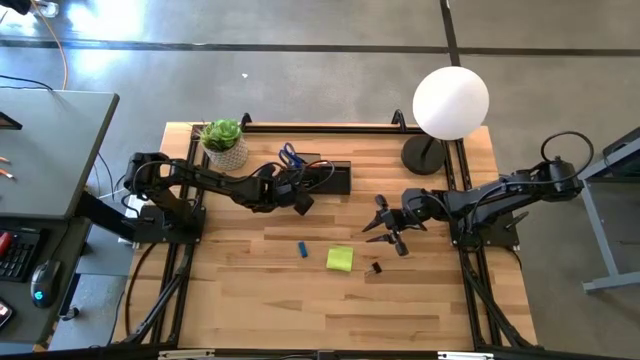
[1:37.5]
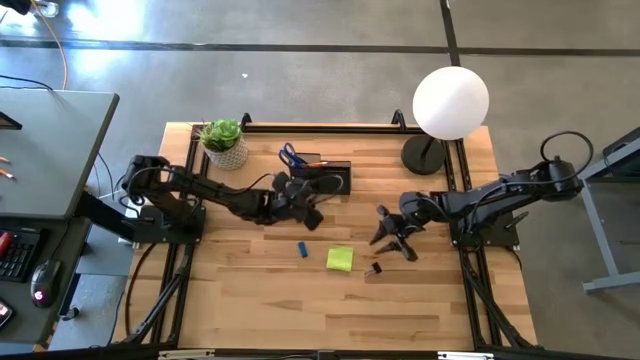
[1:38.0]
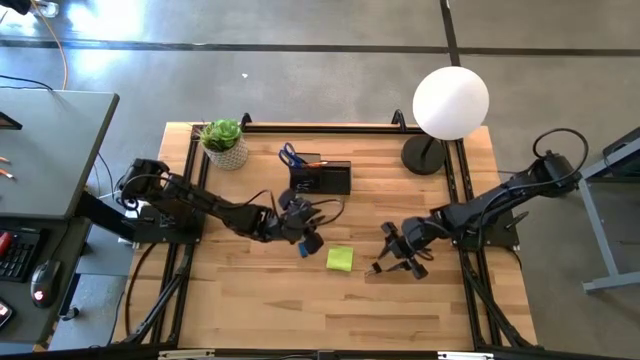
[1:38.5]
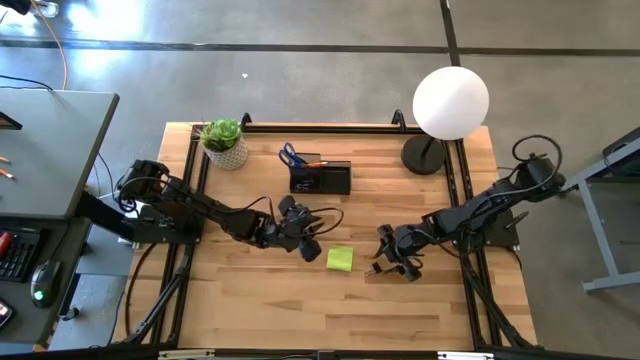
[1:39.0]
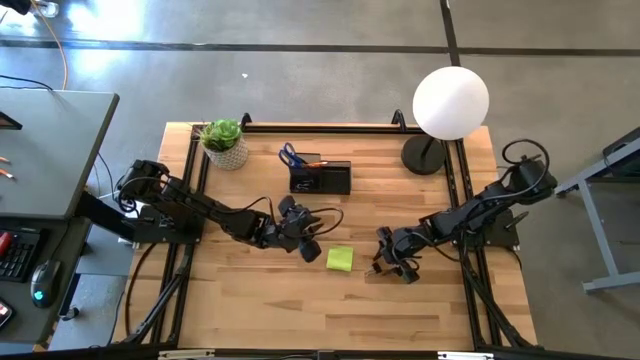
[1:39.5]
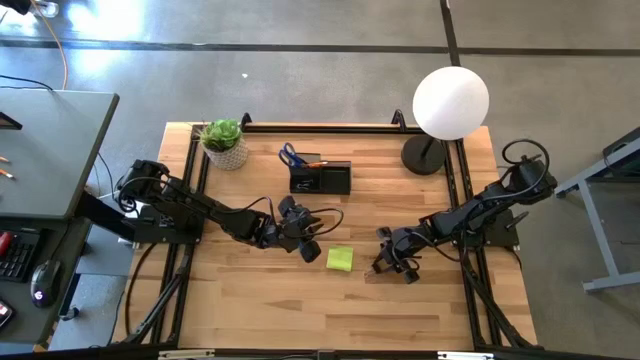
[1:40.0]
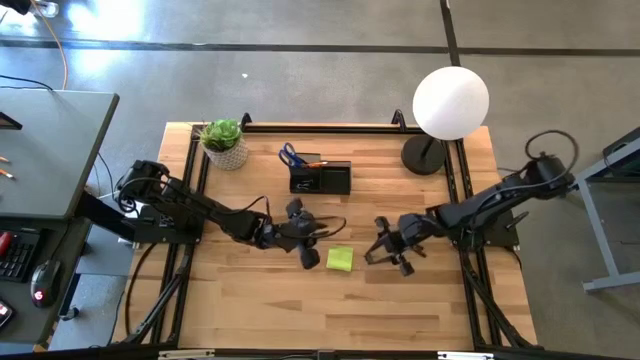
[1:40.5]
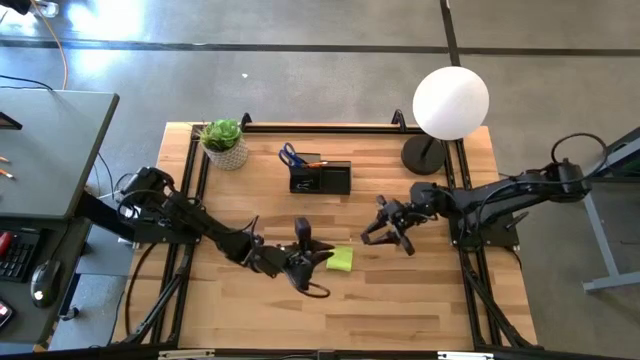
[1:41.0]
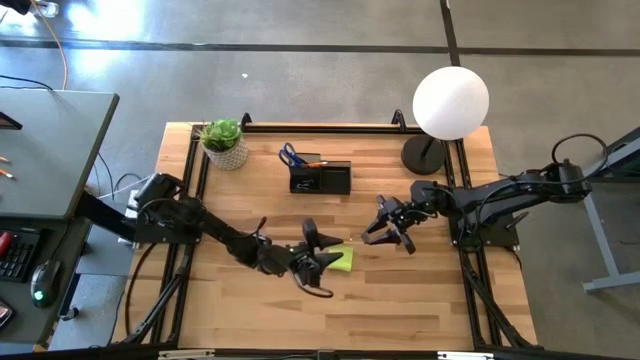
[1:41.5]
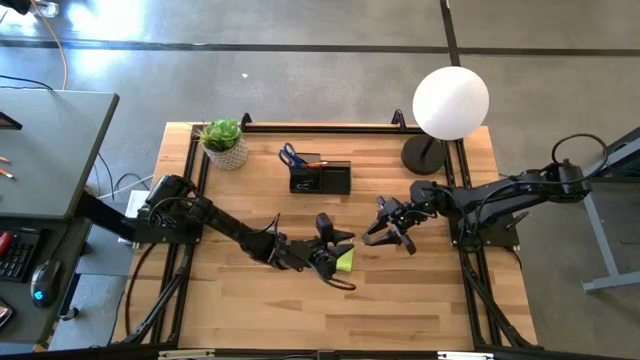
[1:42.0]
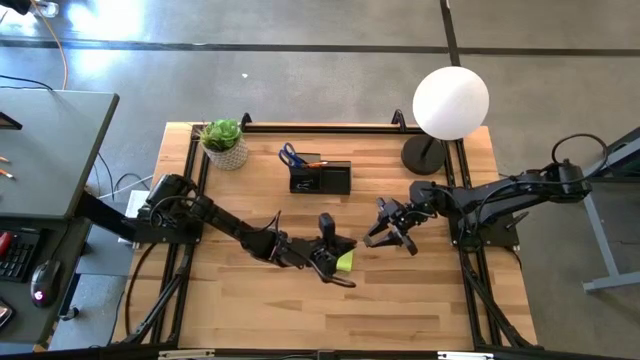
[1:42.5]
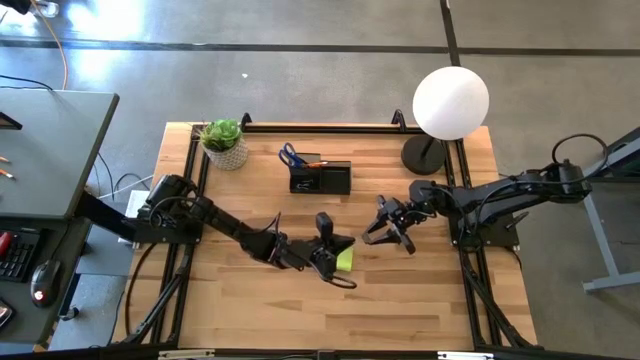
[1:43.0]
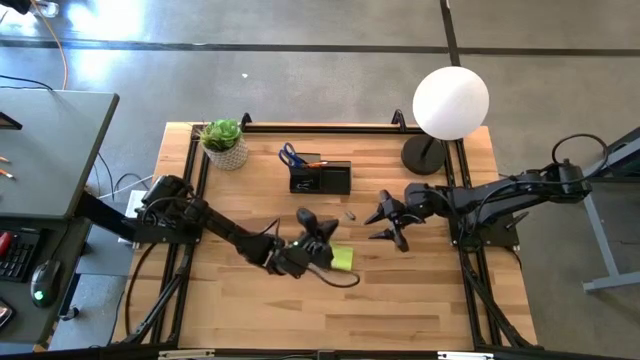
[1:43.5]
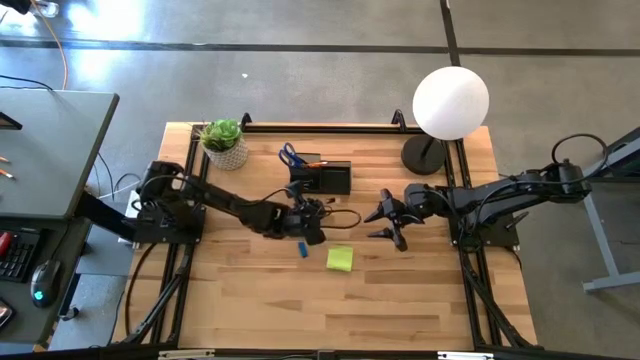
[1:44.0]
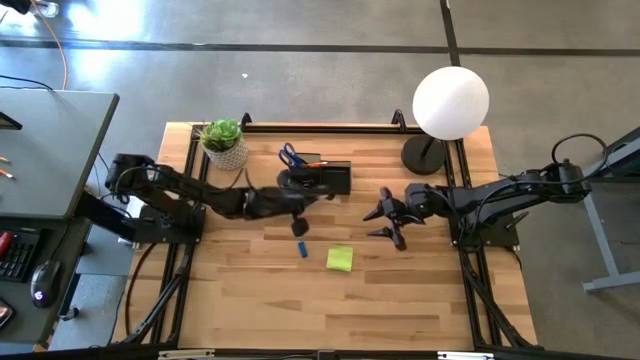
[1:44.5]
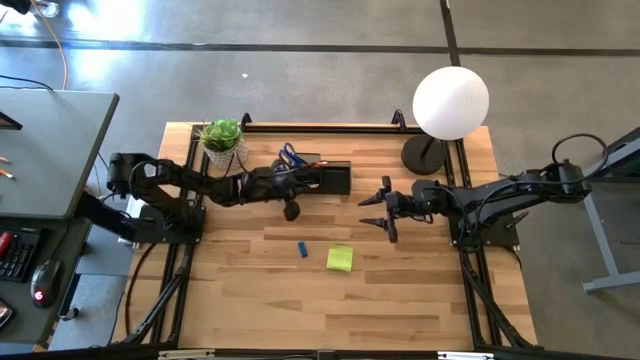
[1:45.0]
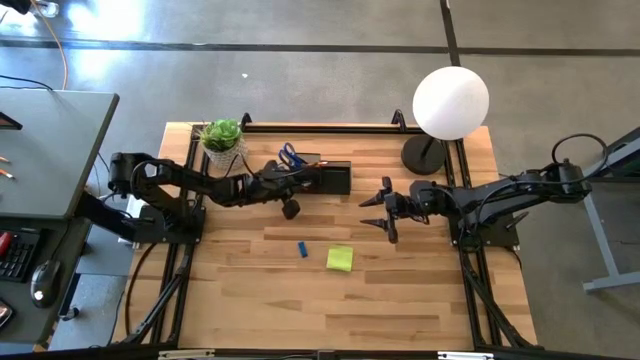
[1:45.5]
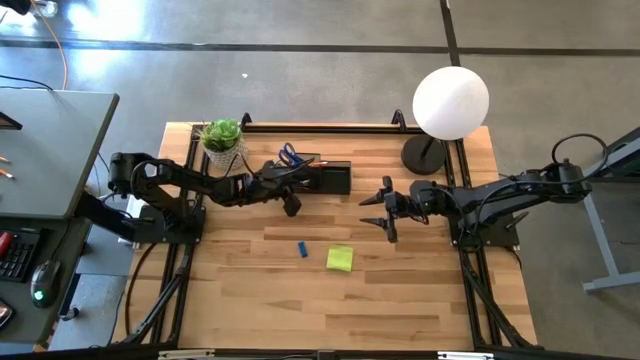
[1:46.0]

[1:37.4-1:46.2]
Task: Pick and place office supplies into organizer
Put the black binder clip into the black desk organizer

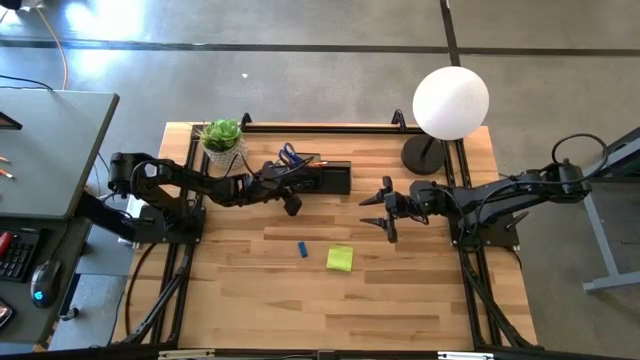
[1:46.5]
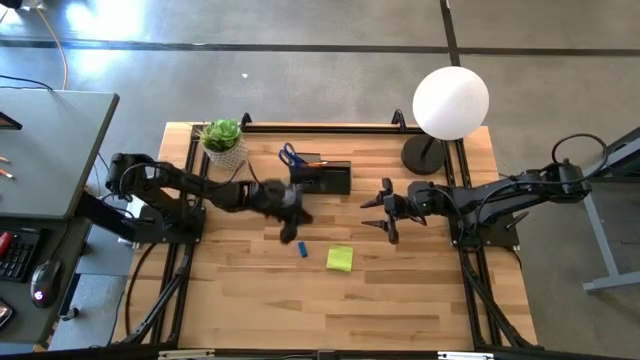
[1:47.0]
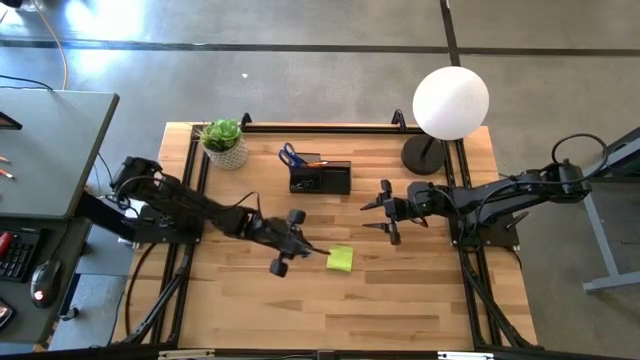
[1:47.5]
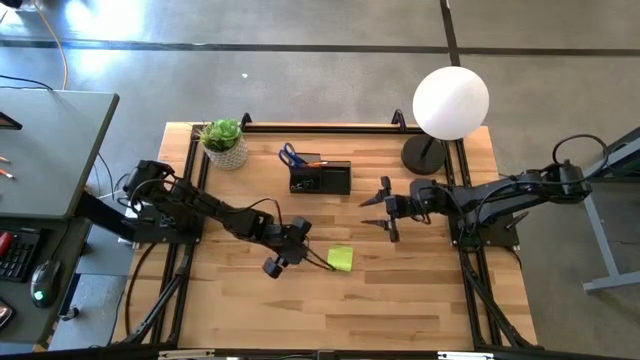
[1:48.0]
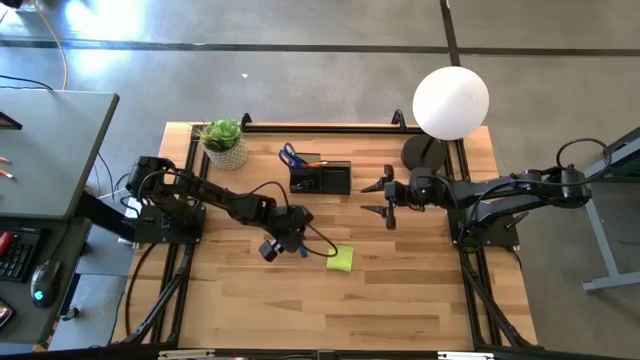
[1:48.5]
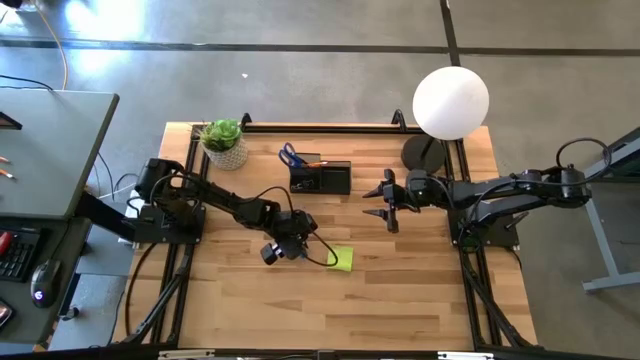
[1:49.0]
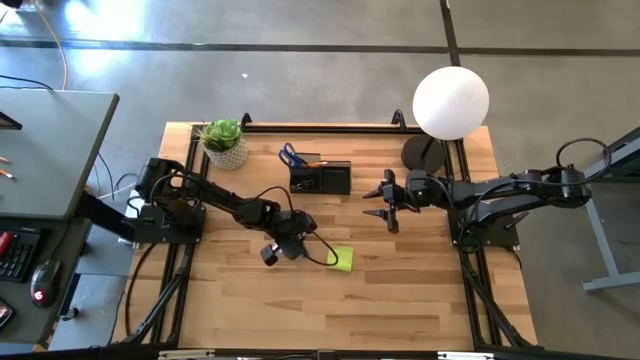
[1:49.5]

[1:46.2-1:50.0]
Put the blue eraser into the black desk organizer

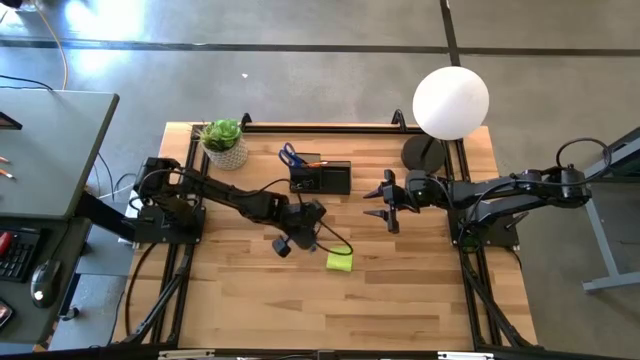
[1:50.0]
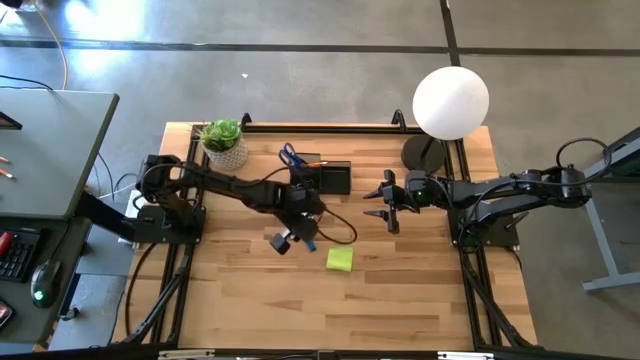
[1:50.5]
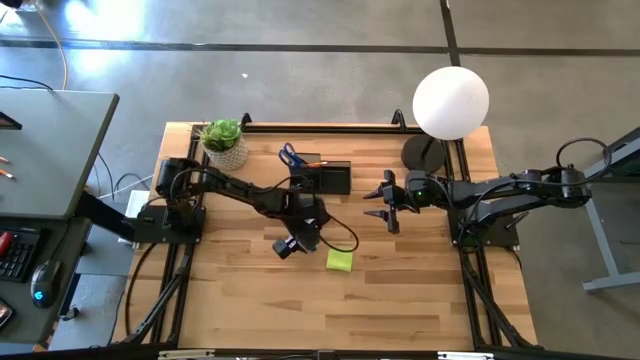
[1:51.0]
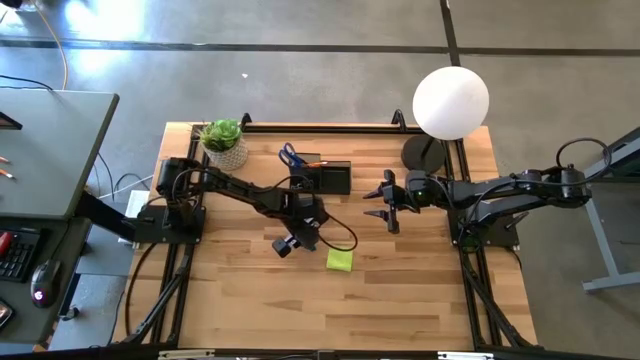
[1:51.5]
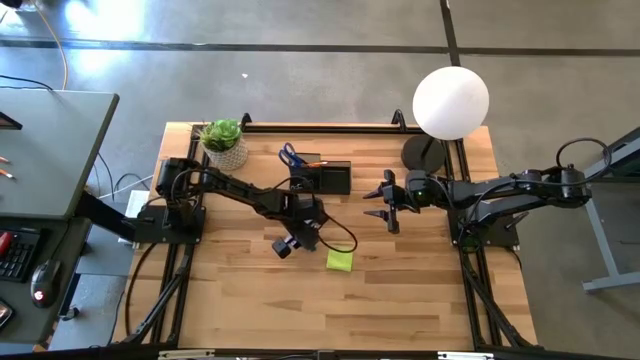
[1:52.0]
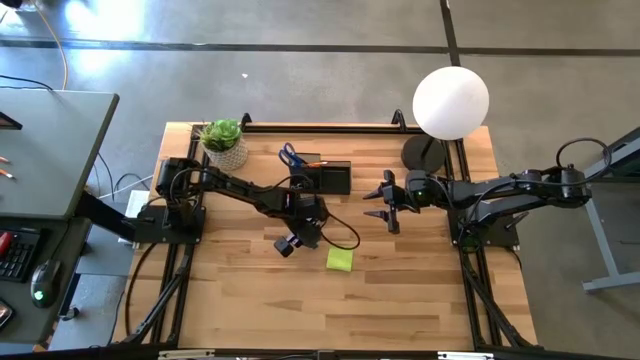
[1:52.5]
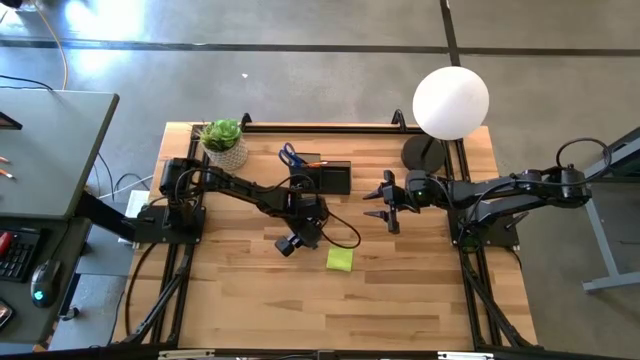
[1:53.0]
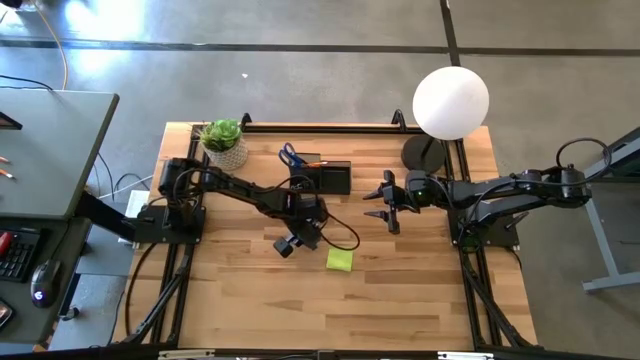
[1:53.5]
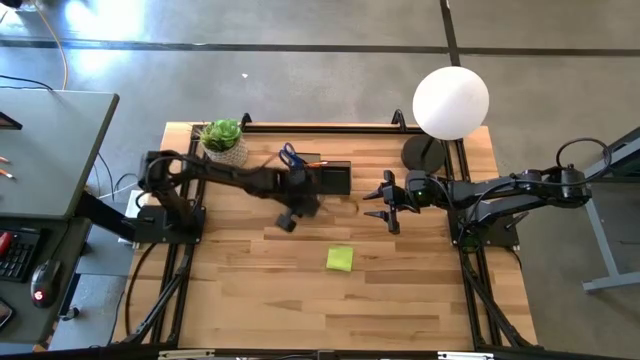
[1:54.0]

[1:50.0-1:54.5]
Put the blue eraser into the black desk organizer

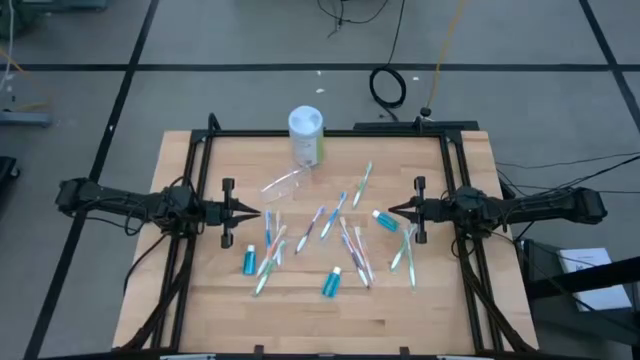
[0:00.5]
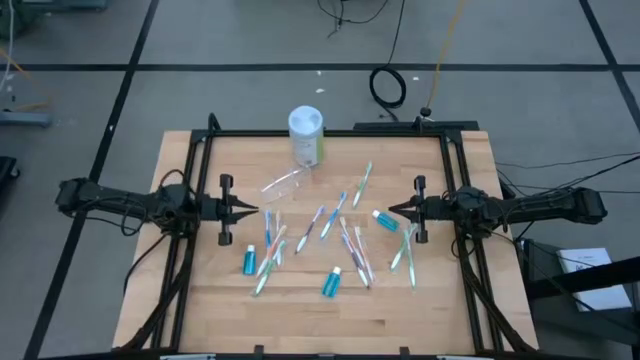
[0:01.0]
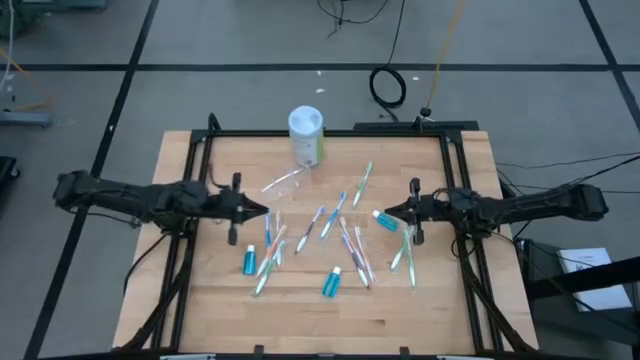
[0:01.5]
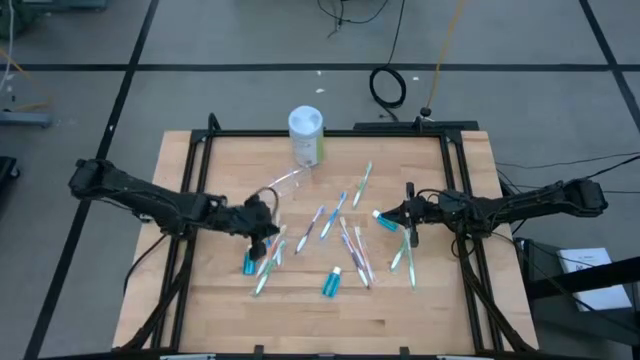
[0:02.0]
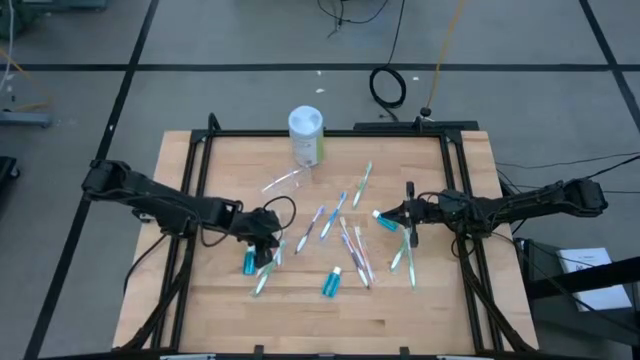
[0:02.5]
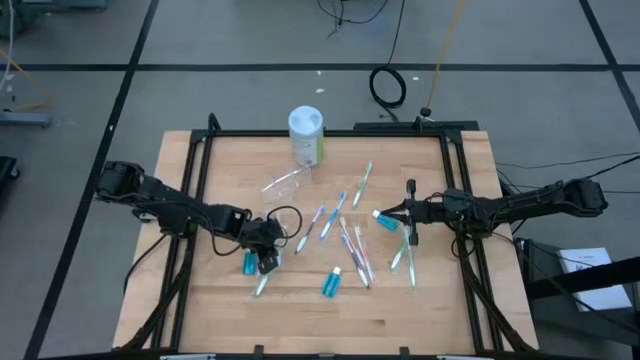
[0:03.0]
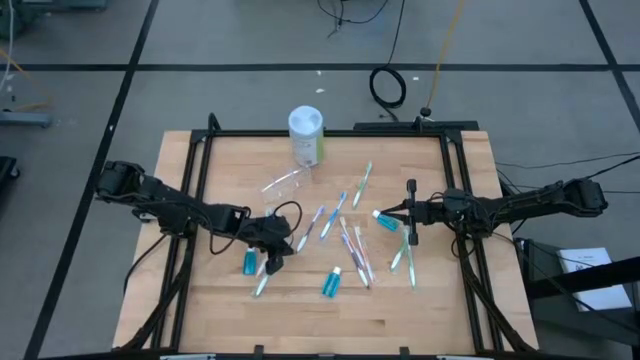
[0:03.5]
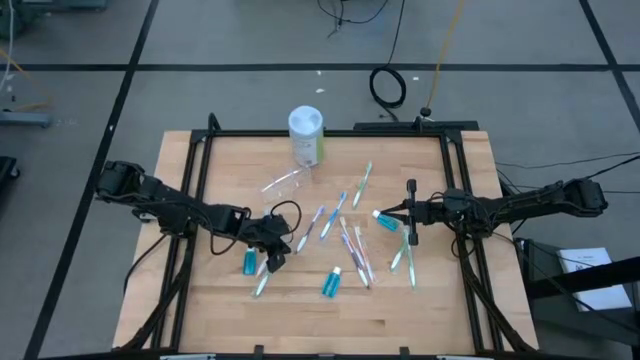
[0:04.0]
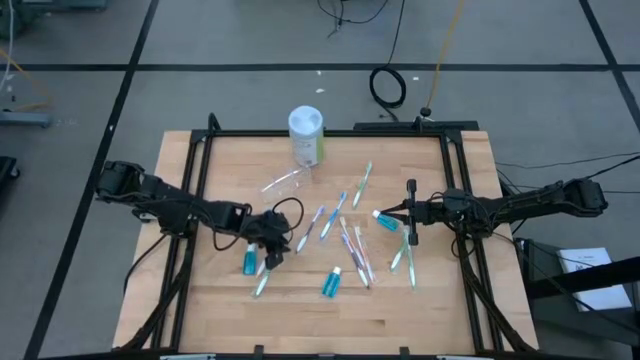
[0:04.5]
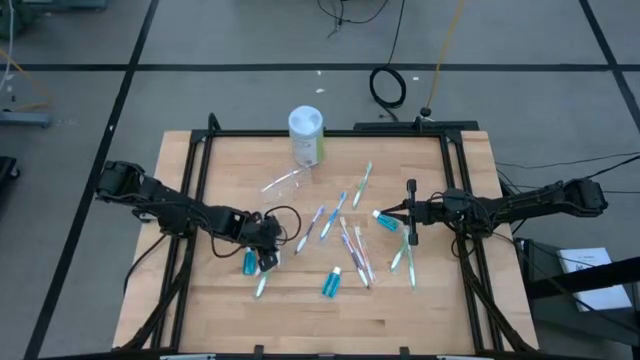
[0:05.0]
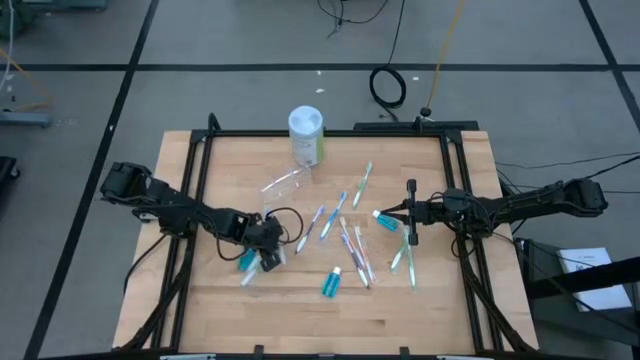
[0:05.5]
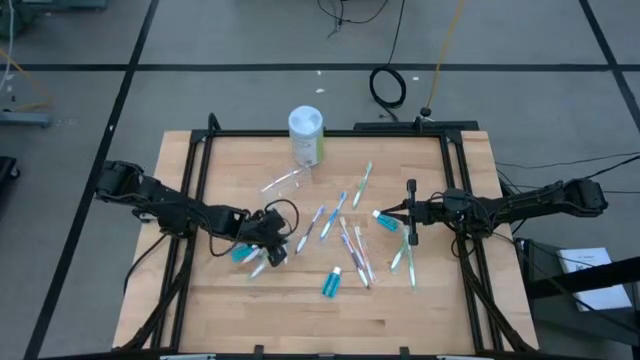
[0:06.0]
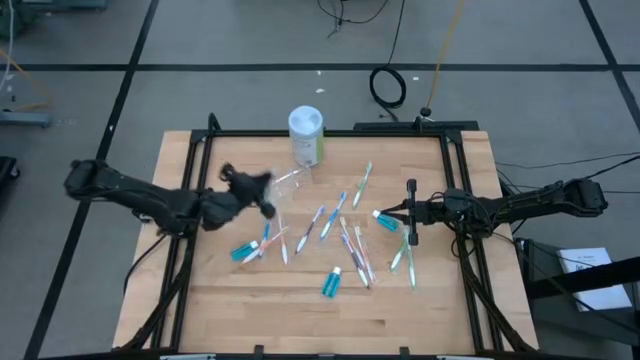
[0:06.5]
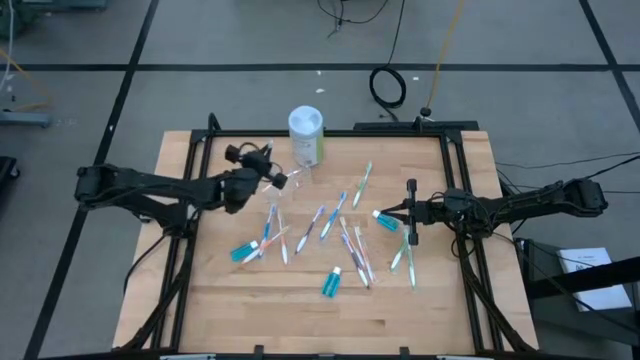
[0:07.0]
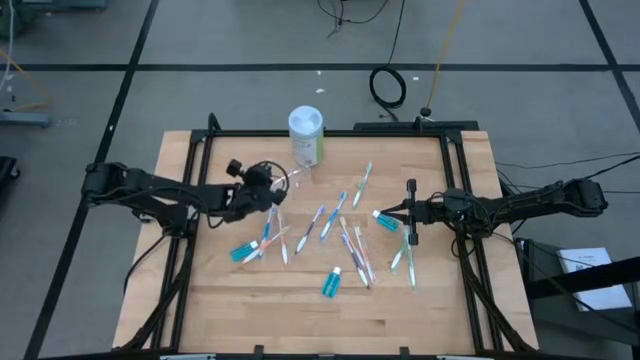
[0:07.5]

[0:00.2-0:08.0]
Task: Pick & Place toothbrushing station
Put the green toothbrush into the transparent organizer
